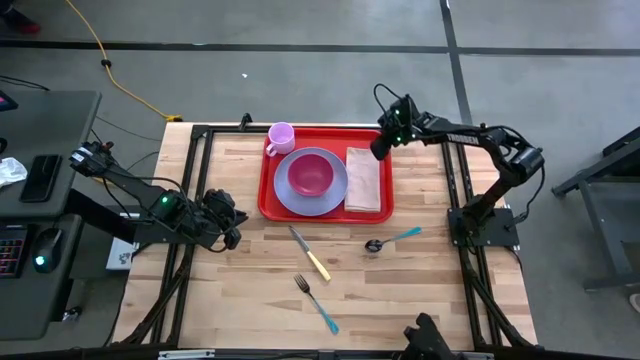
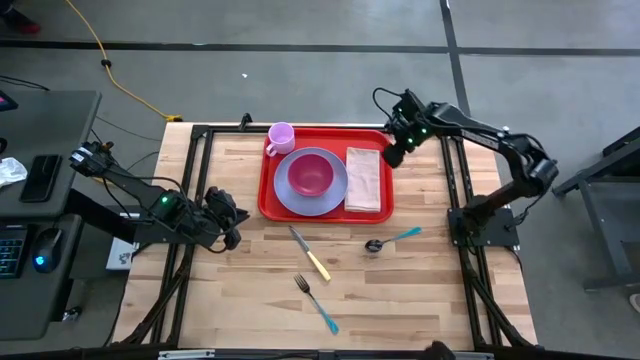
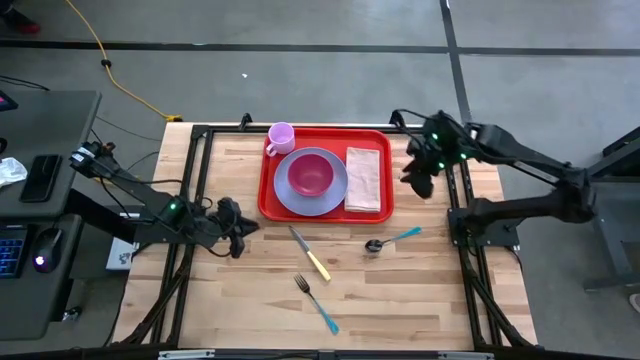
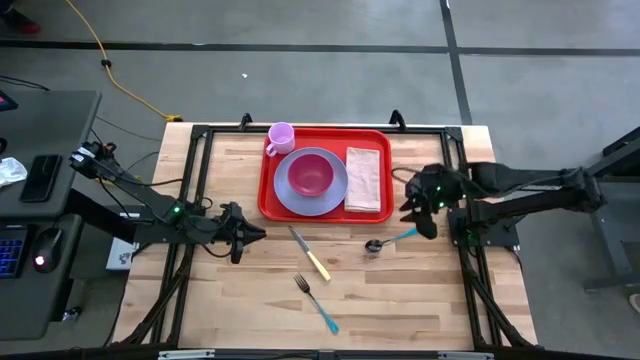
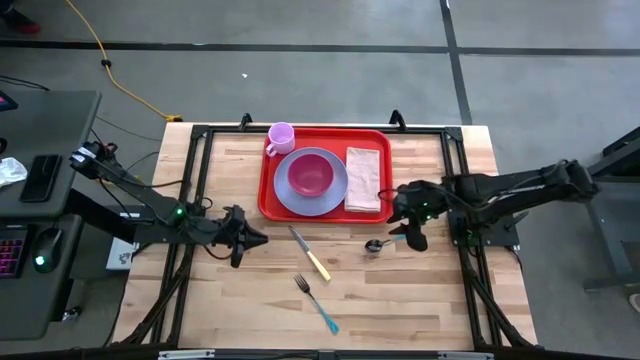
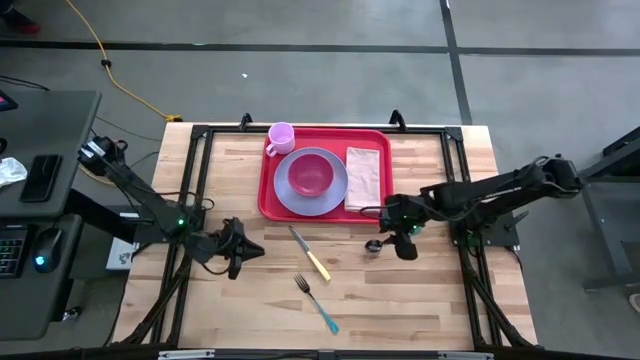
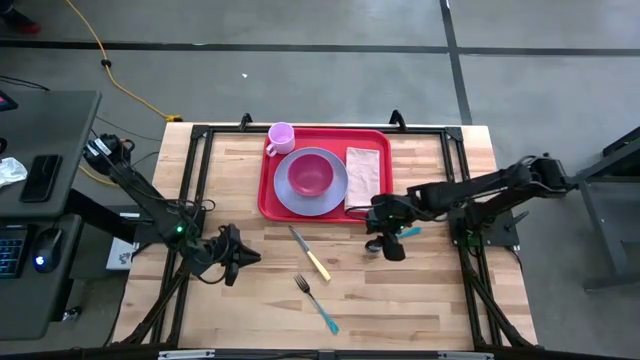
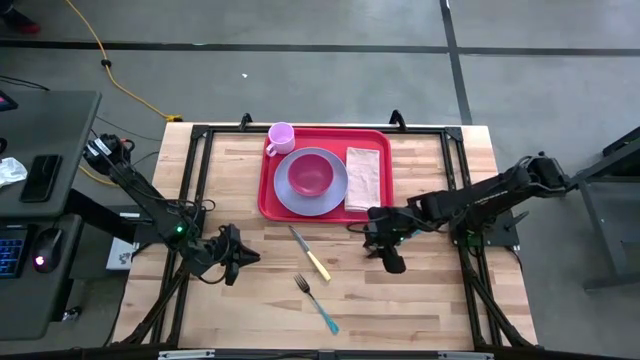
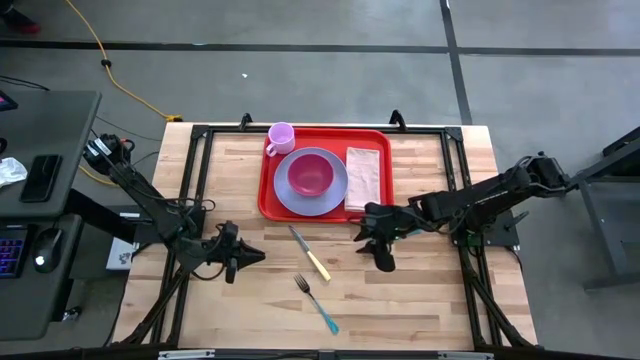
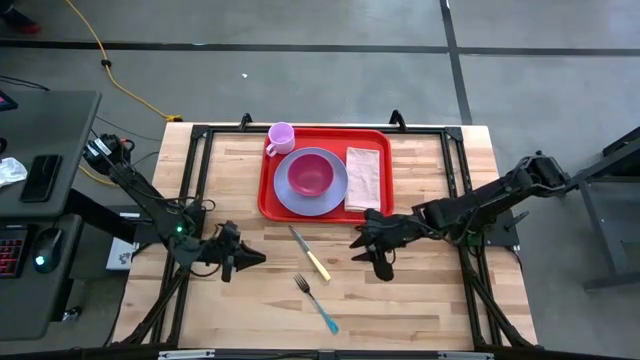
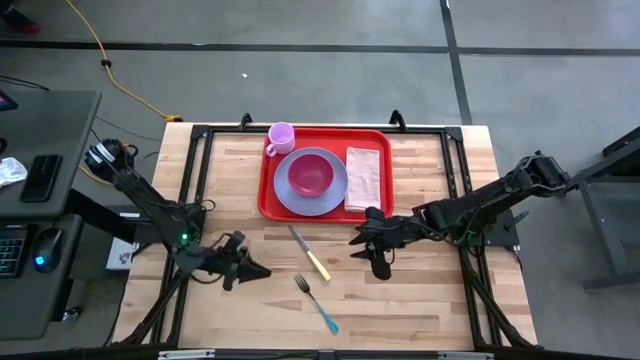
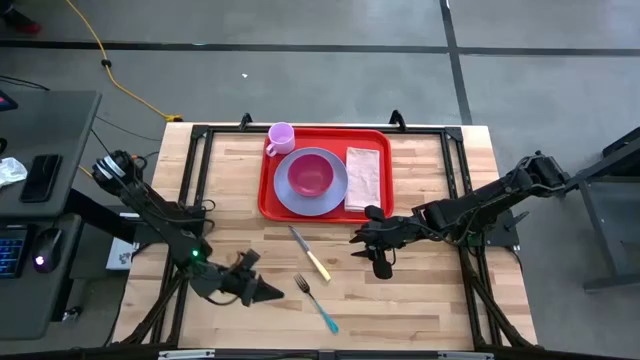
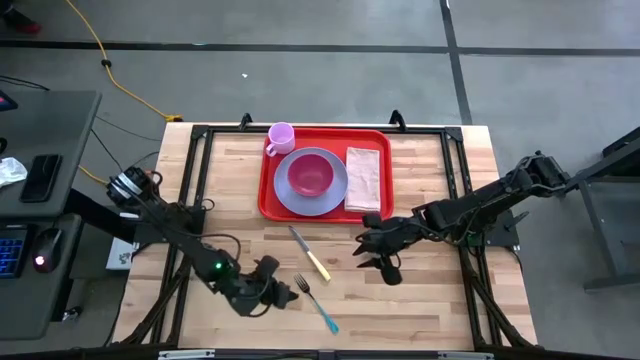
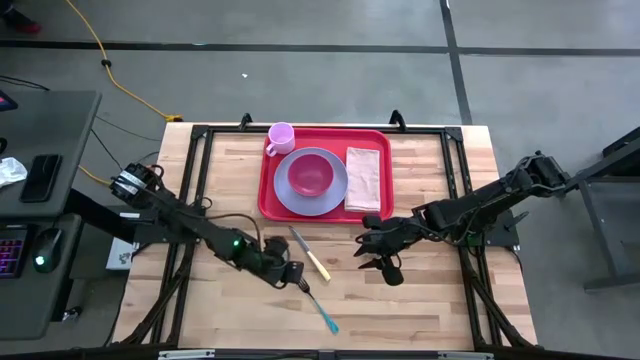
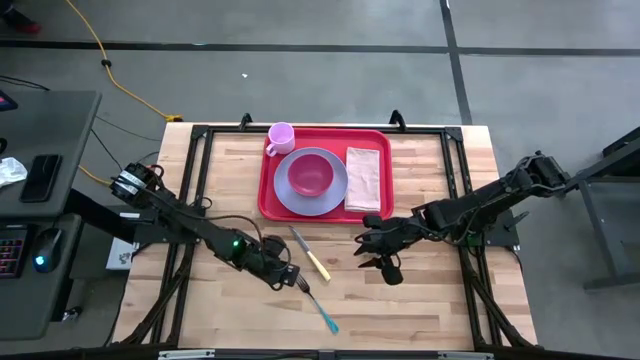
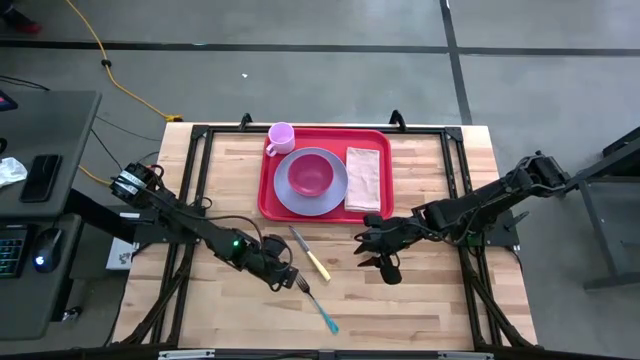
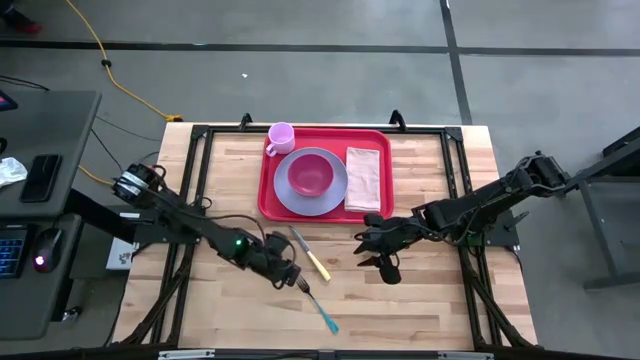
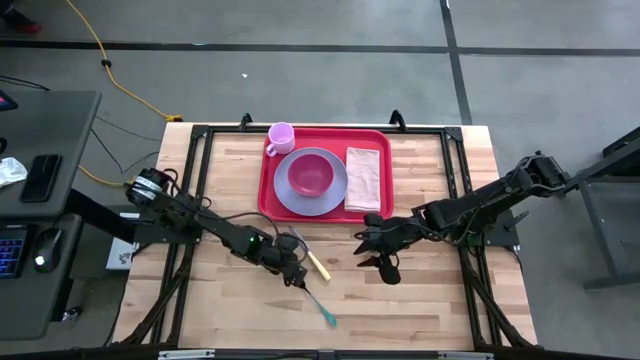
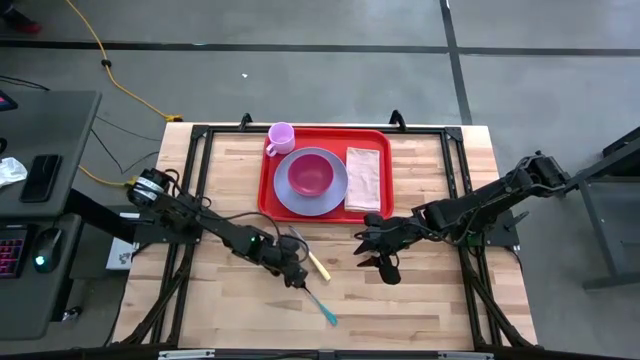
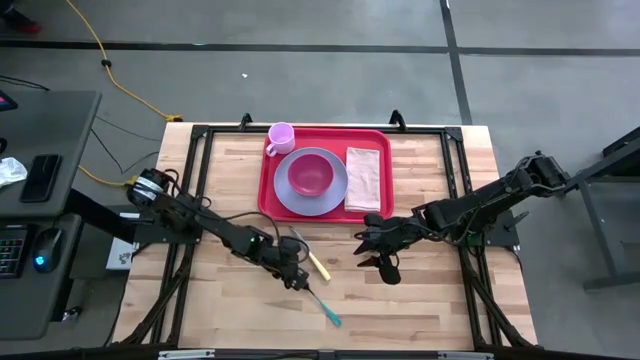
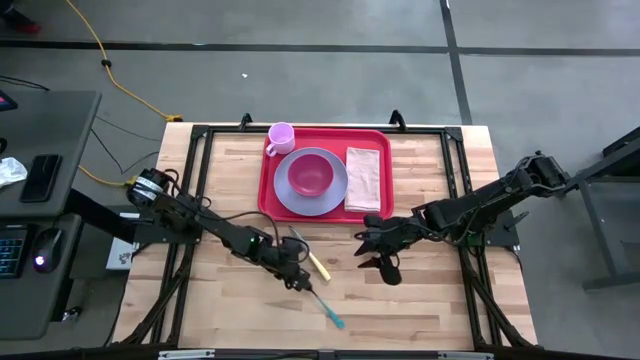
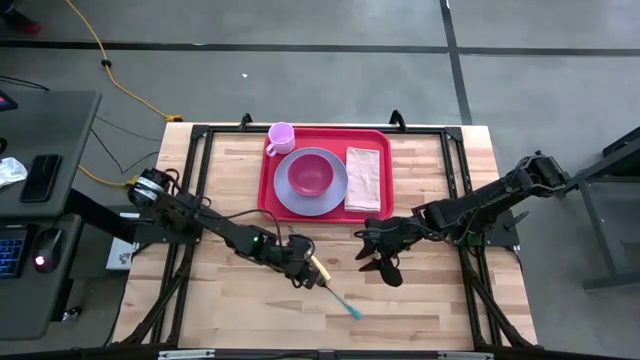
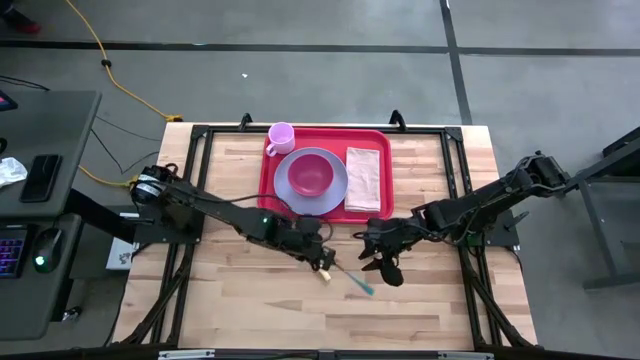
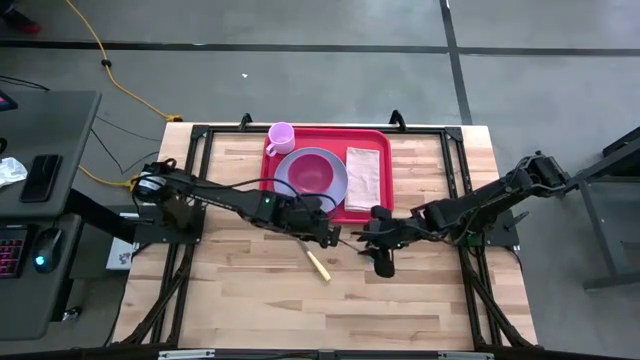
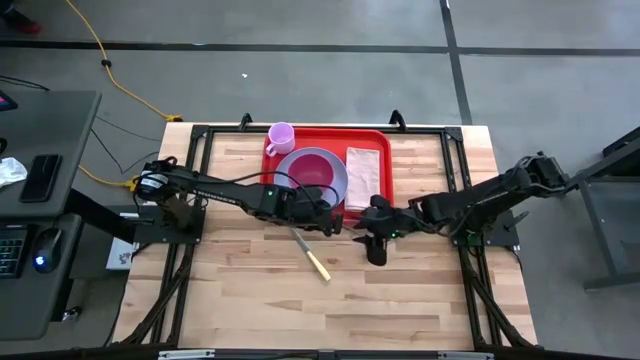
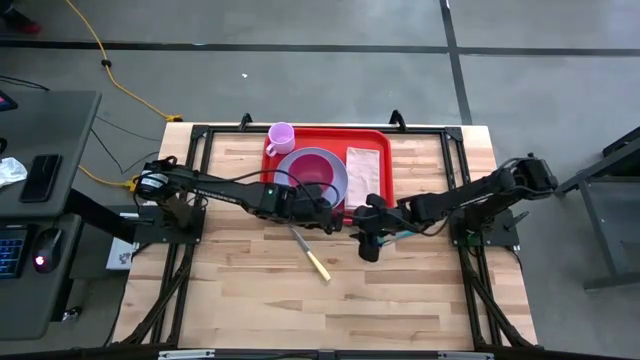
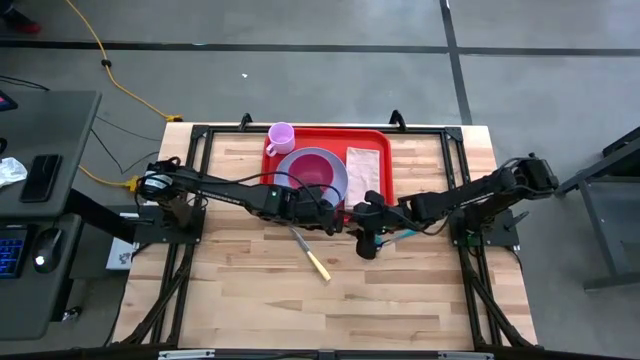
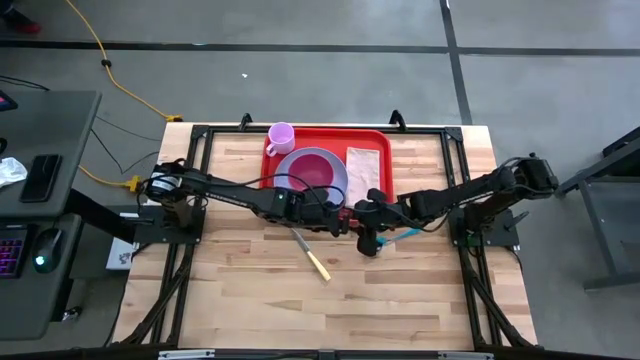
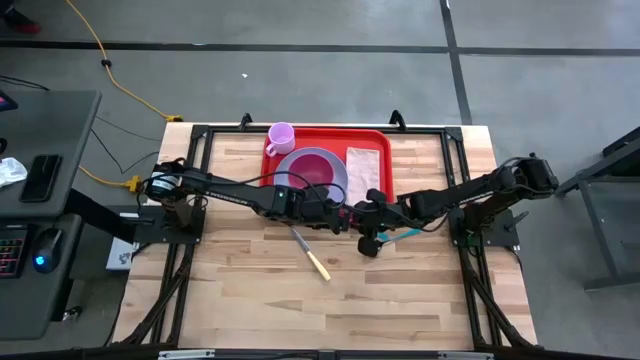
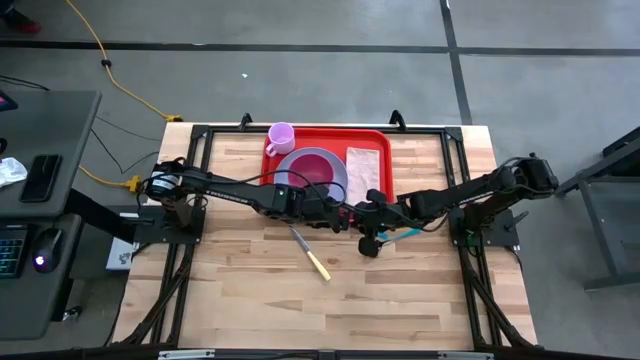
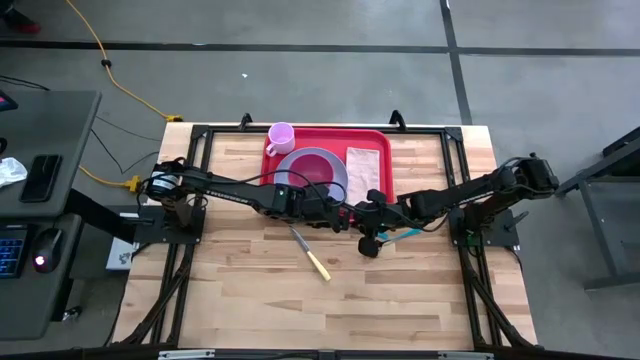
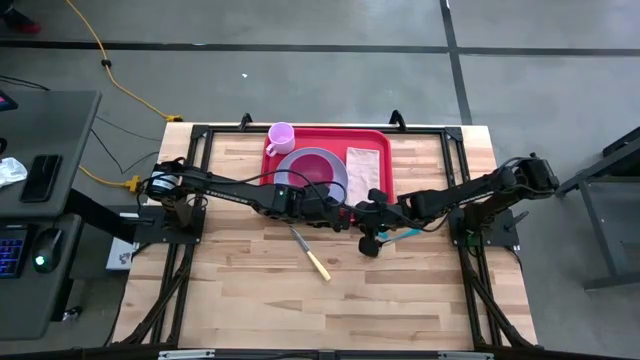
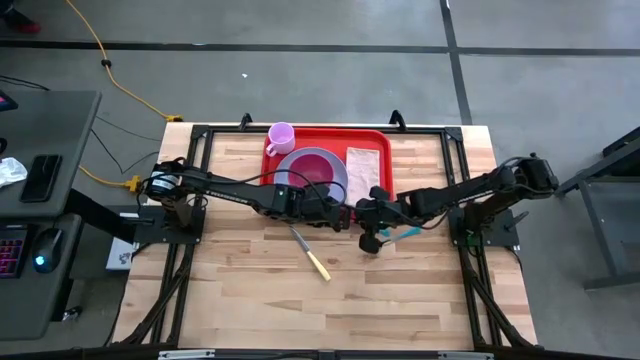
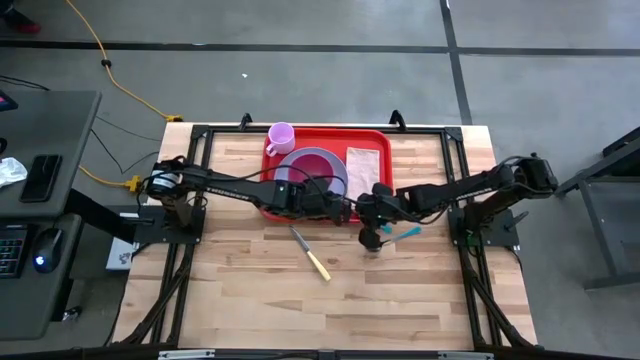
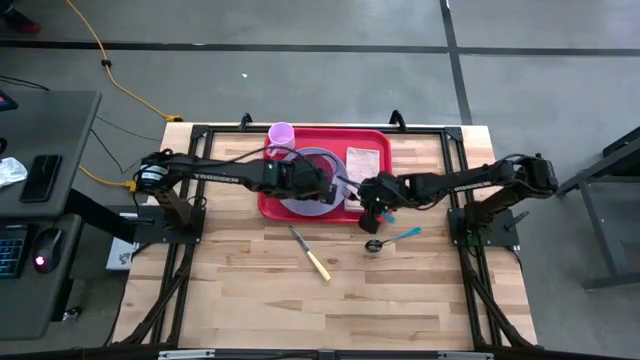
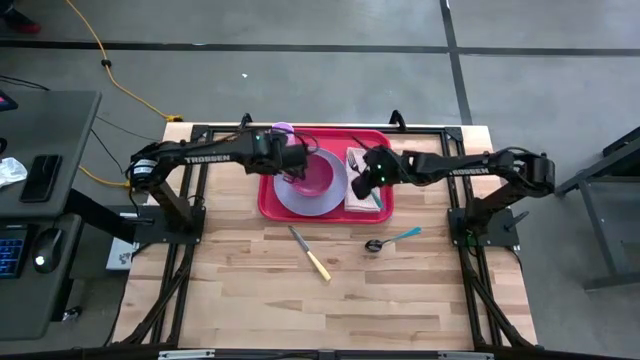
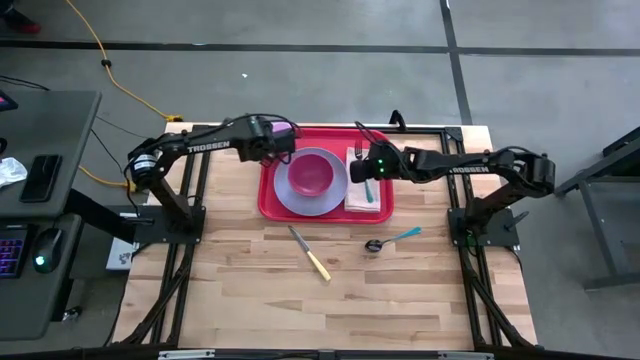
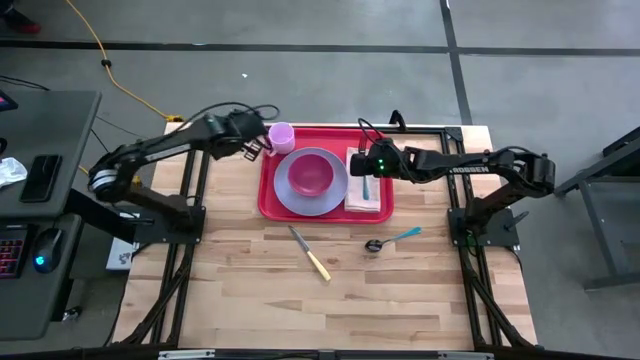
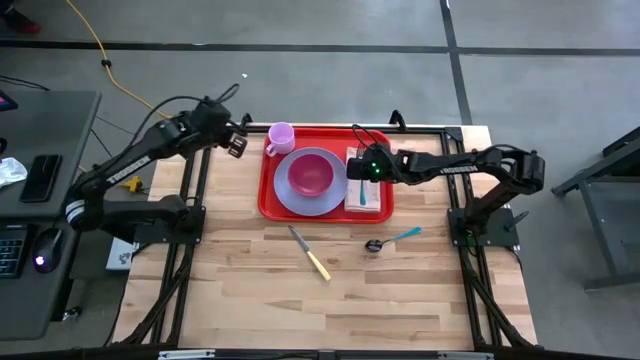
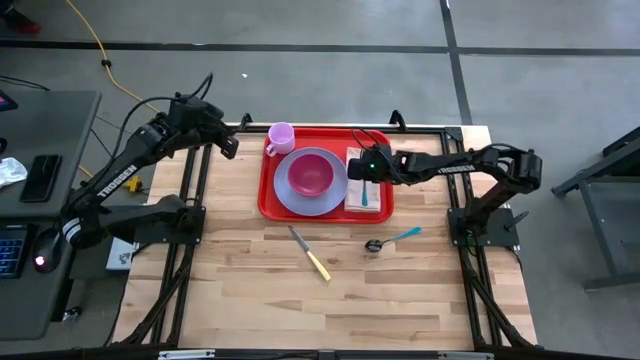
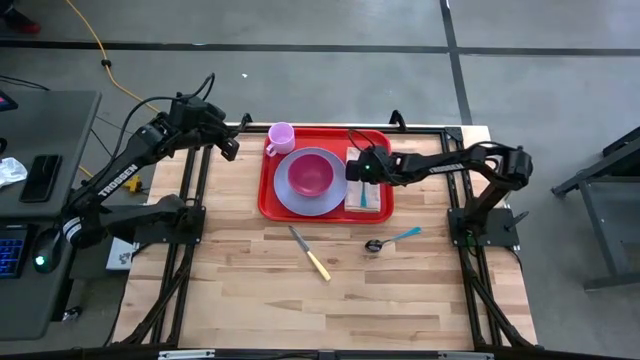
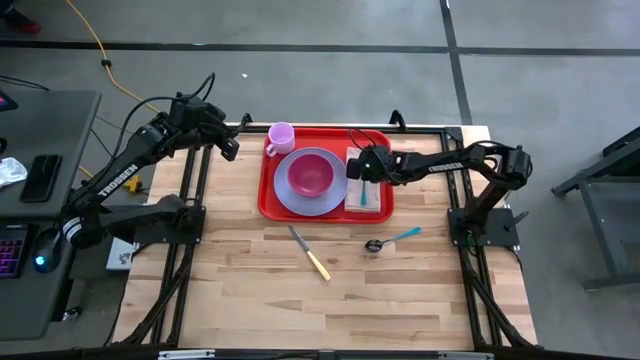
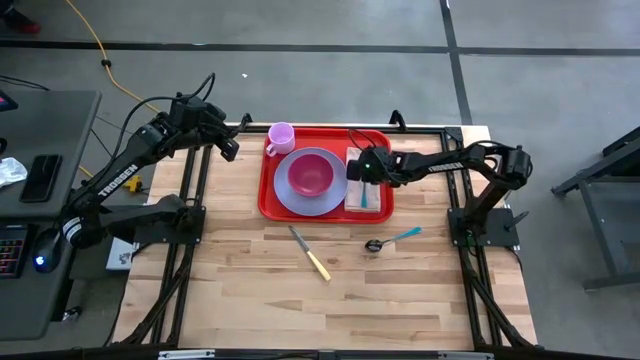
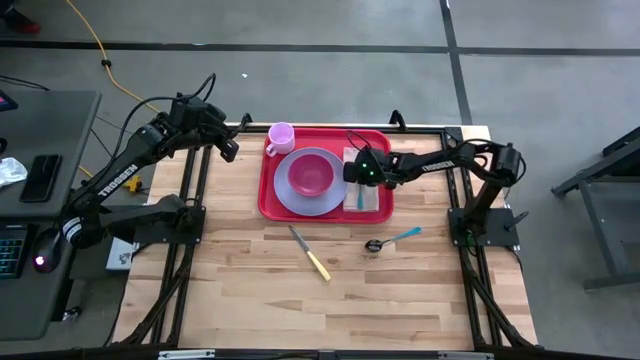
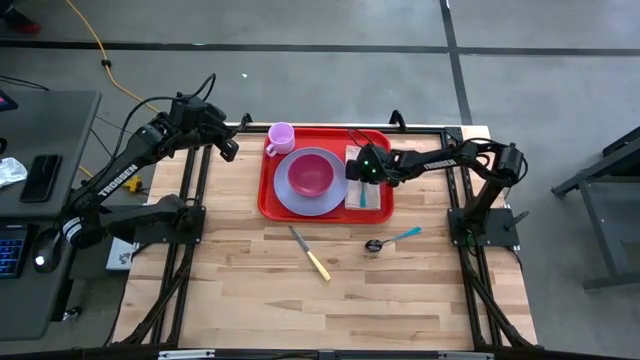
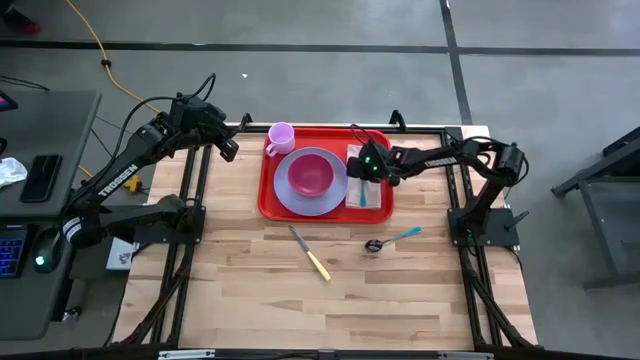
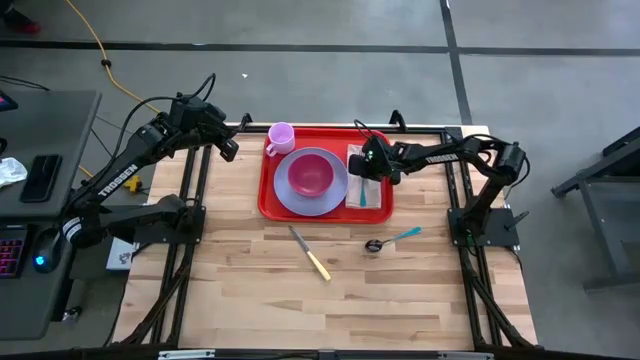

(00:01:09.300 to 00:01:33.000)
Task: Set up tray
Put the blue fork in the center of the light pink napkin
